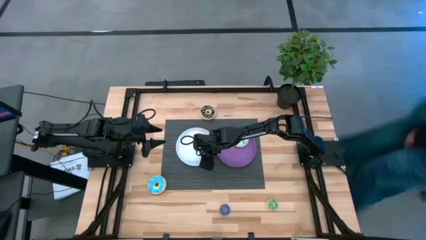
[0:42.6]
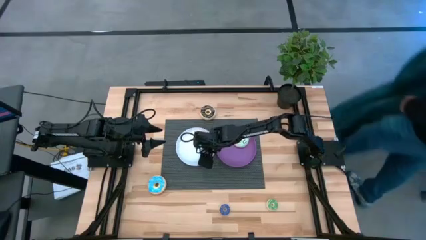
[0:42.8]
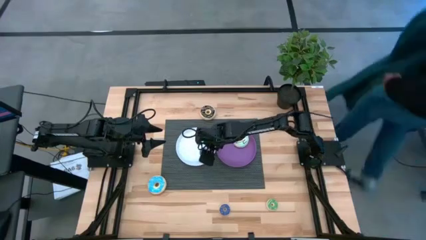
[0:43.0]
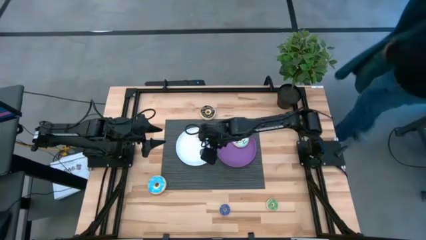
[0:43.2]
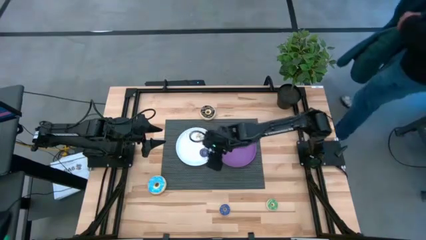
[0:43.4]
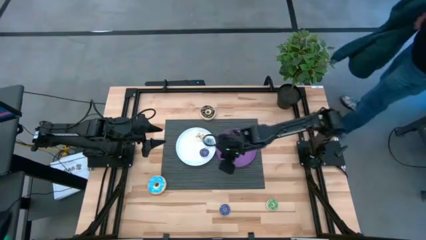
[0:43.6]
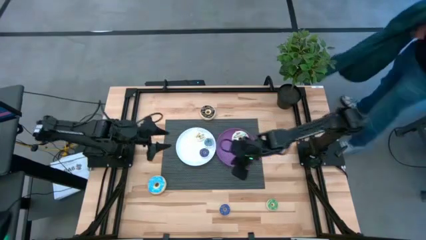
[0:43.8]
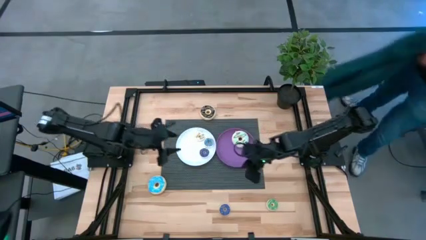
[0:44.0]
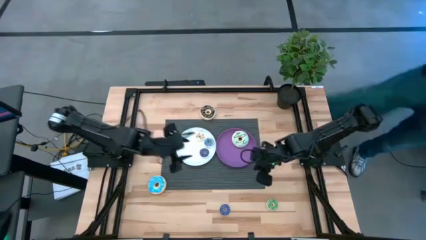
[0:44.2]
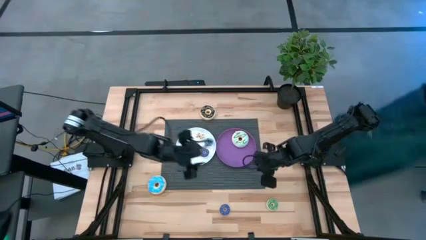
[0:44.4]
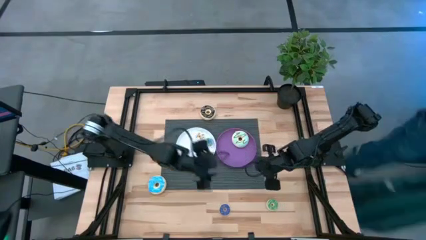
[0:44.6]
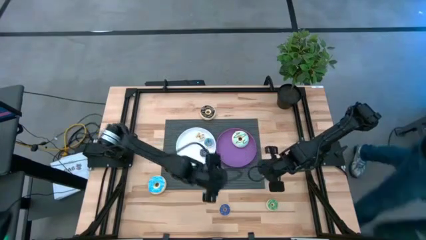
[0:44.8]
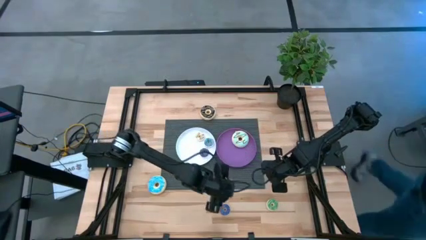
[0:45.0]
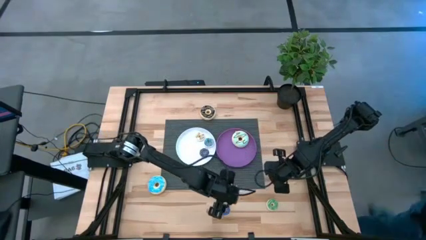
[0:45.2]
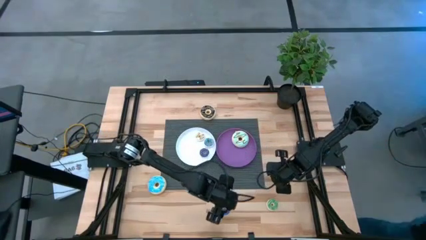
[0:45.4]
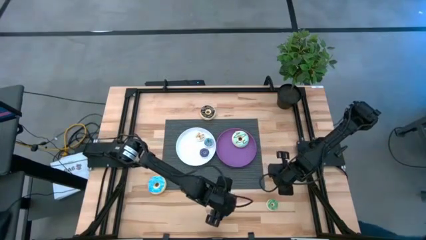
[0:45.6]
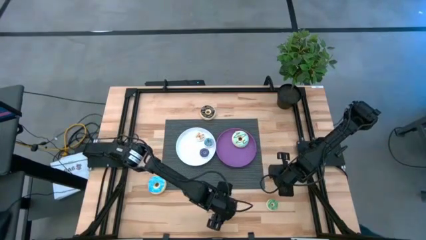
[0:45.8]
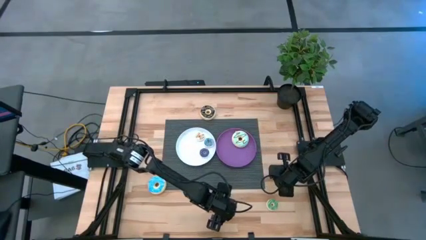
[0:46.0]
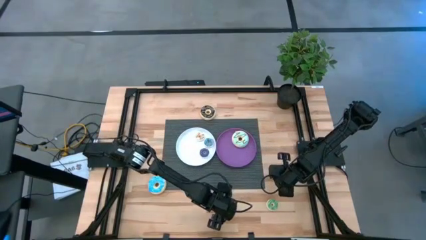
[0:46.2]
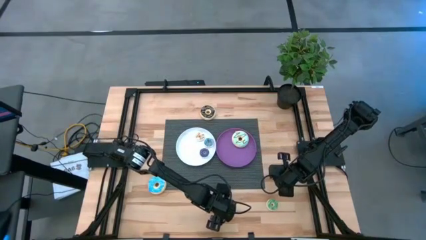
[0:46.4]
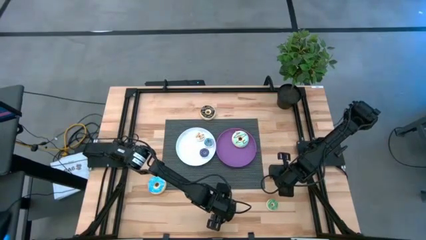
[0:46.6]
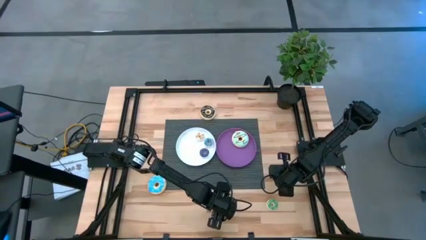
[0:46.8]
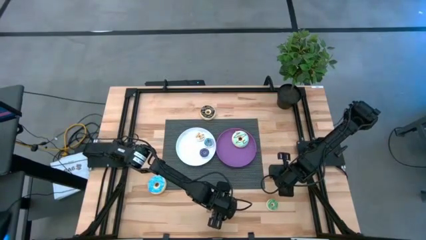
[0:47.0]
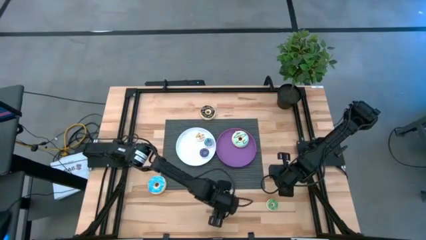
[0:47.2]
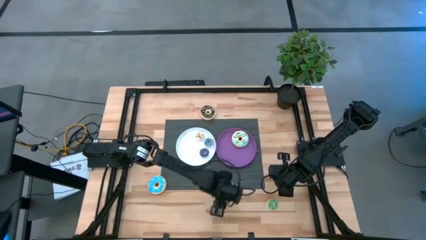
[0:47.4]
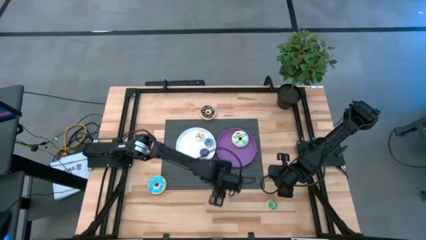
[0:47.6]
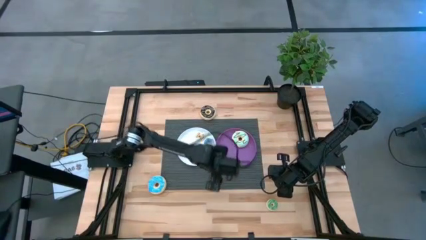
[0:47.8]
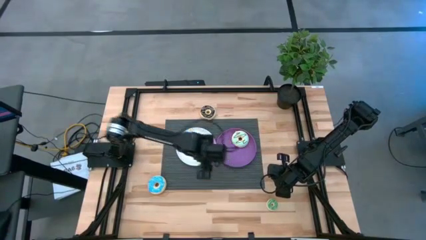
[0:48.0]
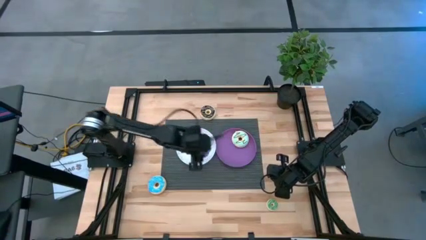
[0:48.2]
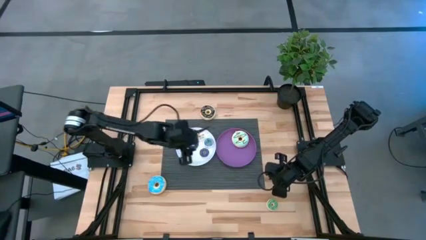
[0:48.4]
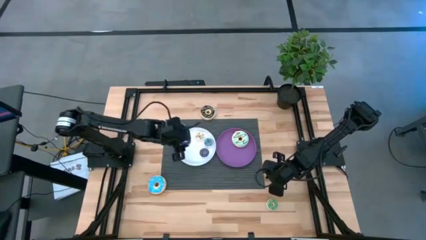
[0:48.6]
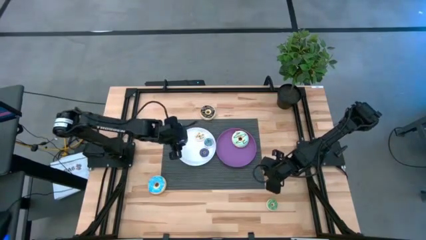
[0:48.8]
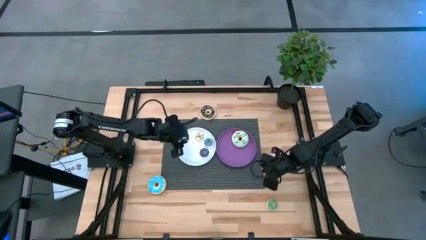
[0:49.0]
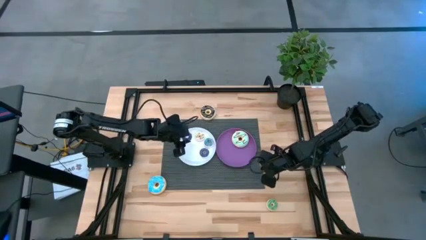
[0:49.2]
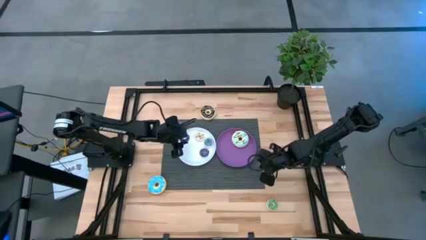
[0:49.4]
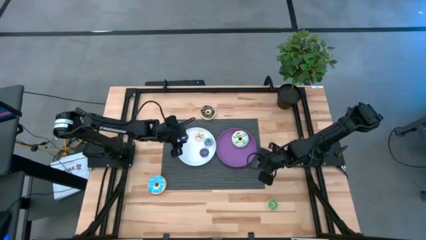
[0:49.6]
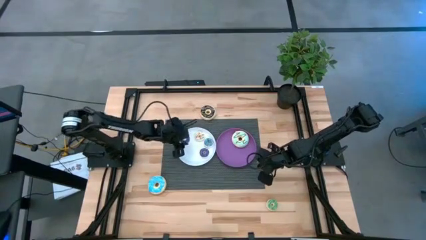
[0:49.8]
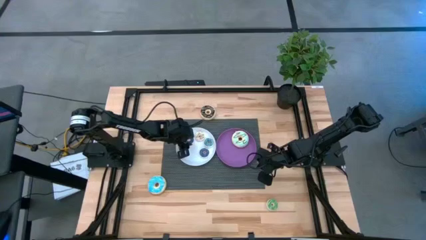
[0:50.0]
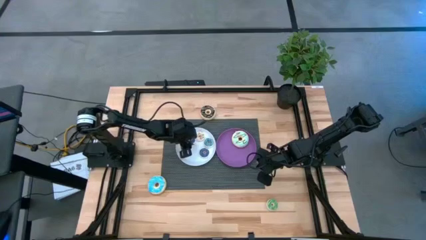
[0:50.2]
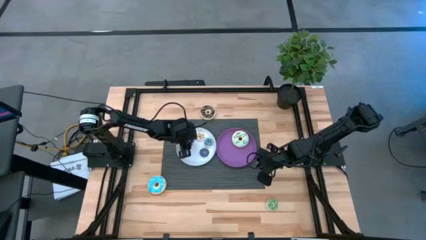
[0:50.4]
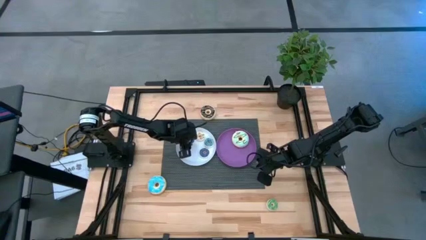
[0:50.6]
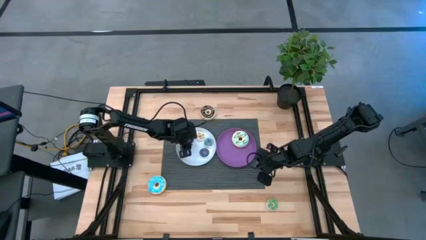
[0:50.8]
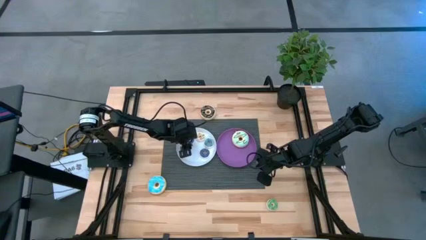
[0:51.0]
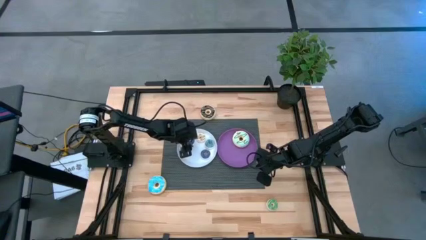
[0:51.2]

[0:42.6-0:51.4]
Task: Pick & Place donuts
Put the small dark blue donut on the white plate

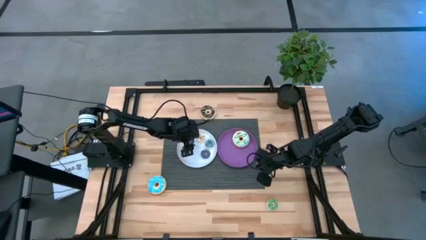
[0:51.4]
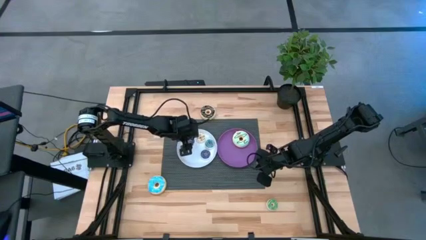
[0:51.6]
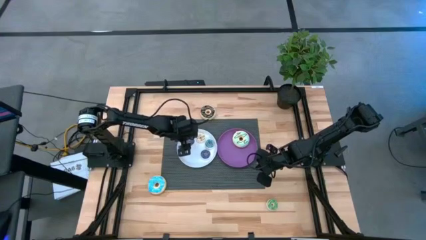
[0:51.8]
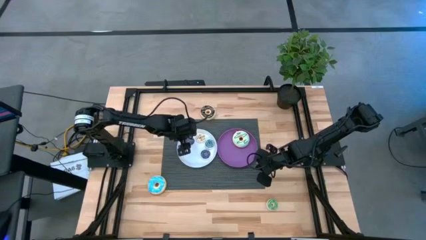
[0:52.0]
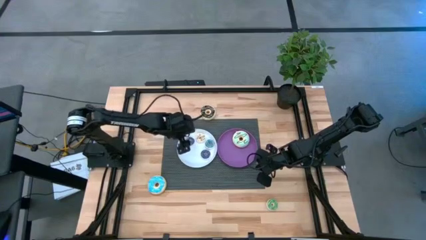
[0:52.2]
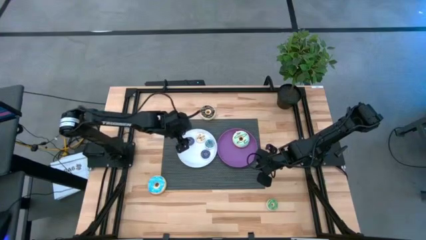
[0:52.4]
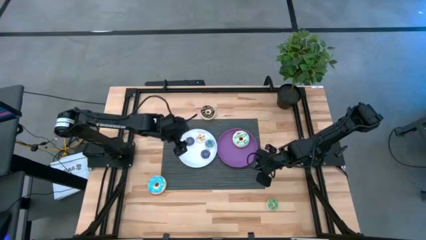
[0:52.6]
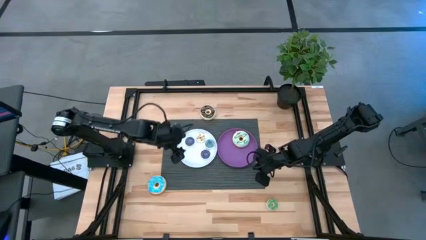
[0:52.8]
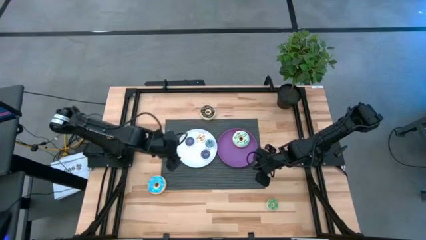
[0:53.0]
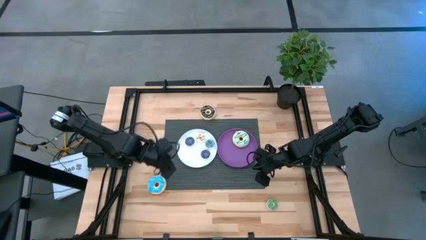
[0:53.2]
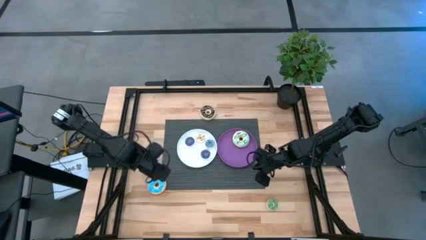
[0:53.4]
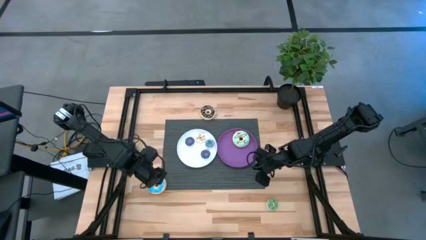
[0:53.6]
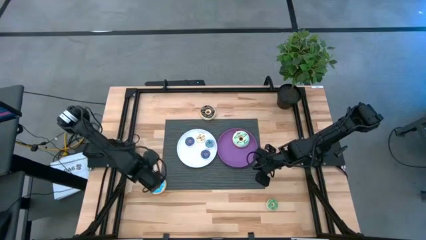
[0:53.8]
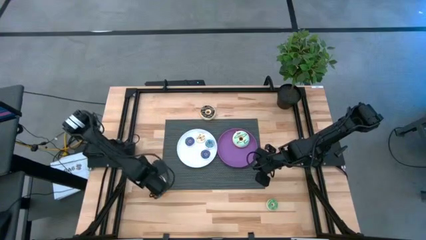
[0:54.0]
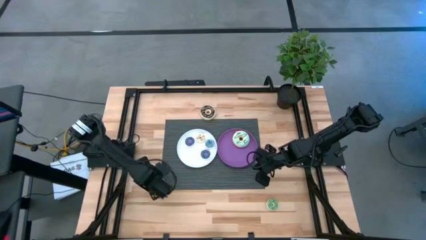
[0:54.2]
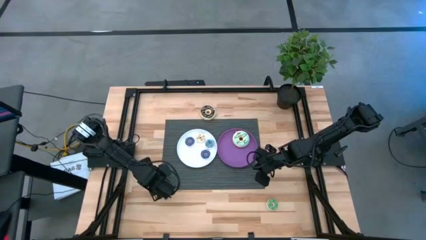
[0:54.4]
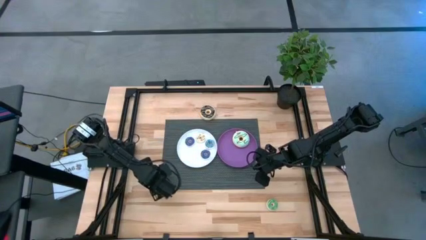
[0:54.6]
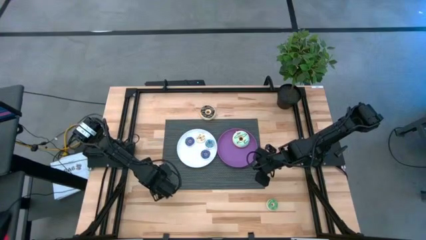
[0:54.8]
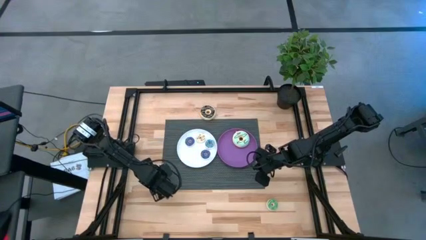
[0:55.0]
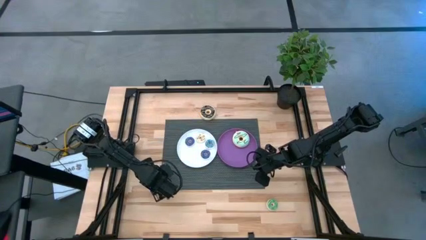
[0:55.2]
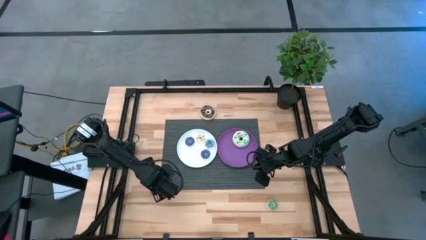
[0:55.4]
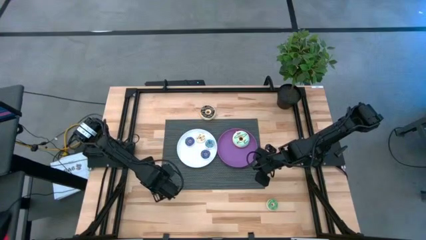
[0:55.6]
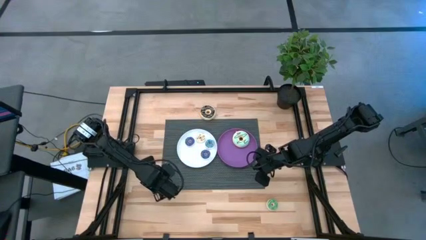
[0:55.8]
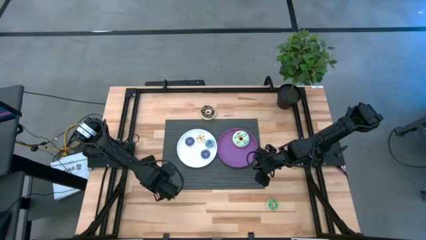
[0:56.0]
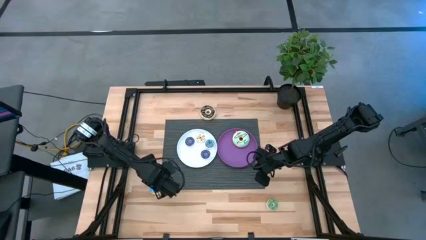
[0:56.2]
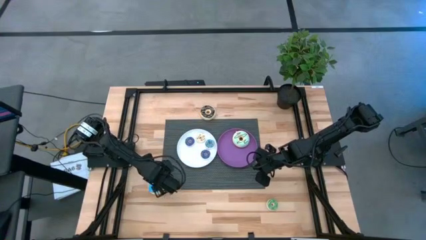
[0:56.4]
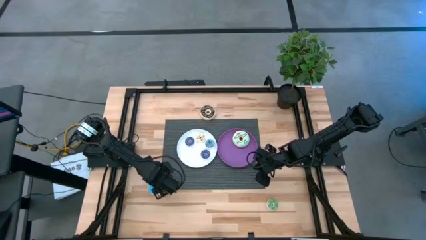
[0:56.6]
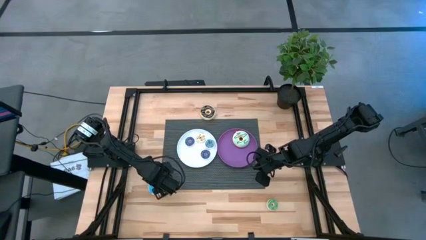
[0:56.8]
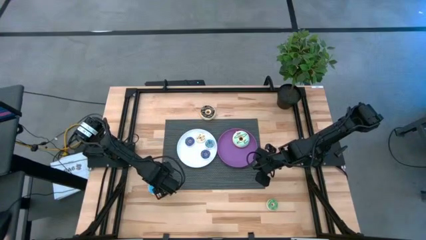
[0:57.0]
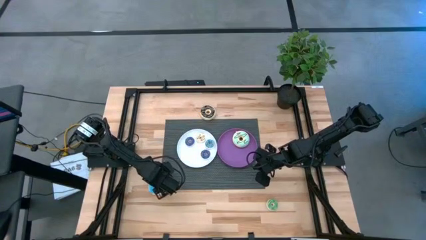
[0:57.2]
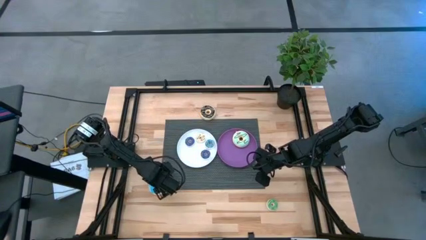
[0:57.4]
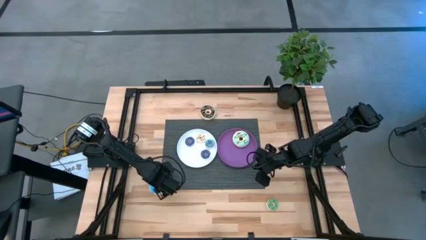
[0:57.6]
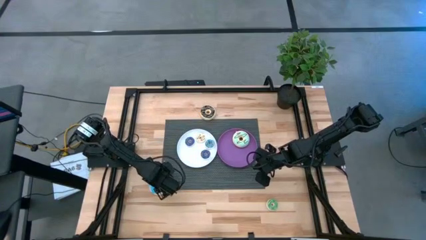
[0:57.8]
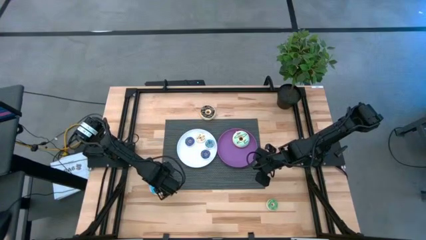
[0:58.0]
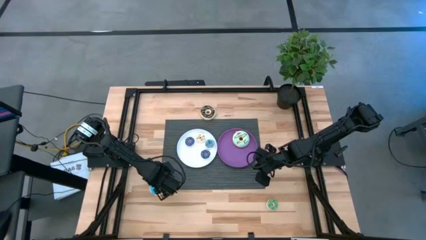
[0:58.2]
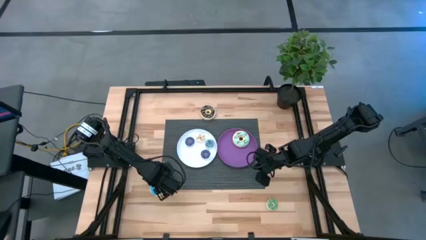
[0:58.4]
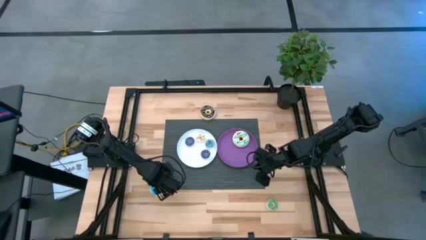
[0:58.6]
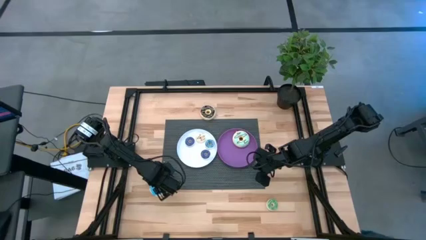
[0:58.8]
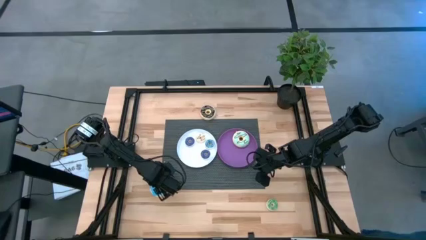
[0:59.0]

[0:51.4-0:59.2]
Put the large blue donut on the violet plate
